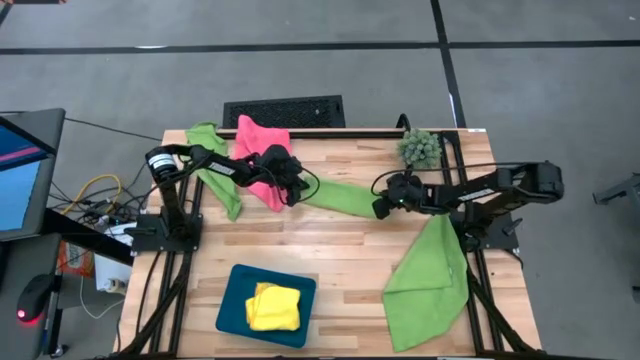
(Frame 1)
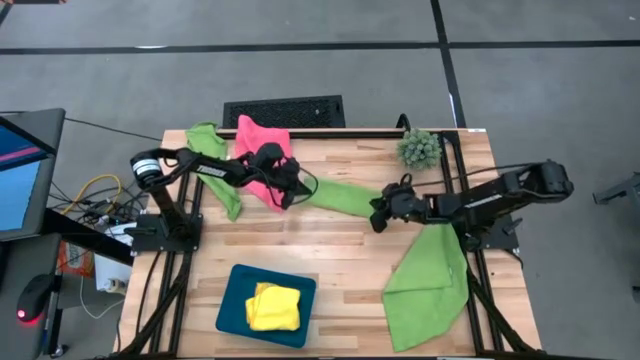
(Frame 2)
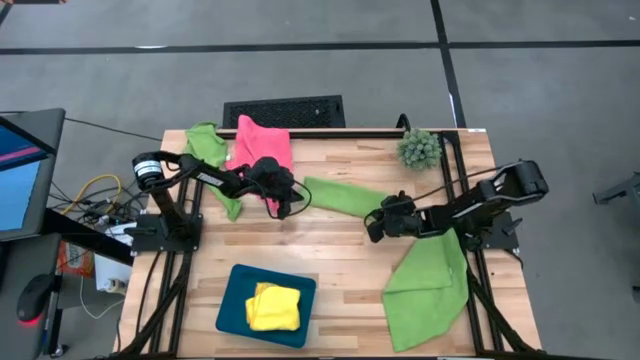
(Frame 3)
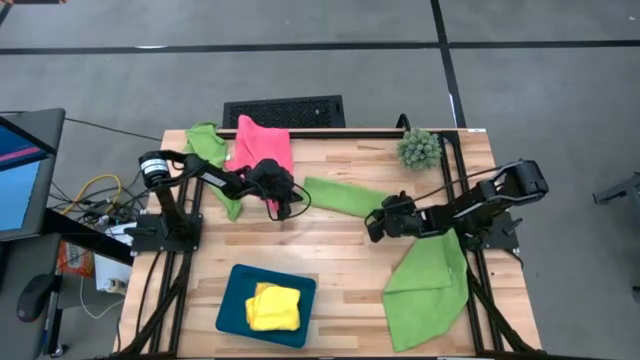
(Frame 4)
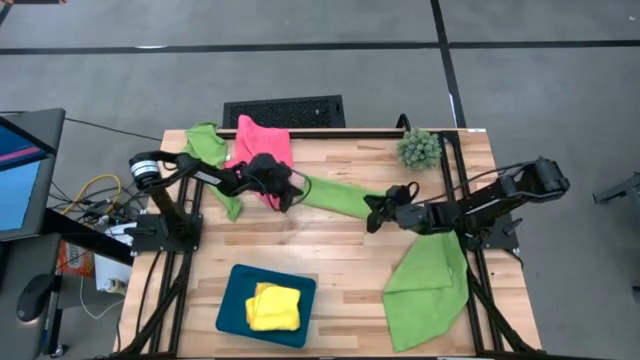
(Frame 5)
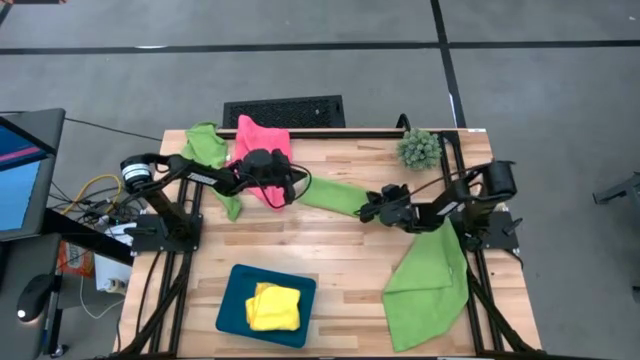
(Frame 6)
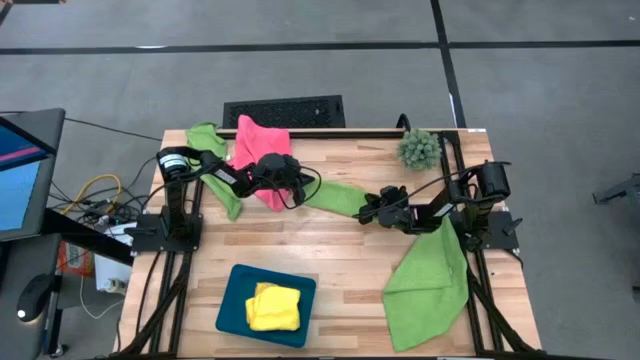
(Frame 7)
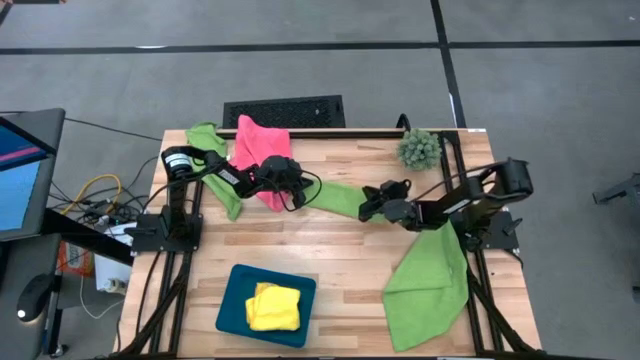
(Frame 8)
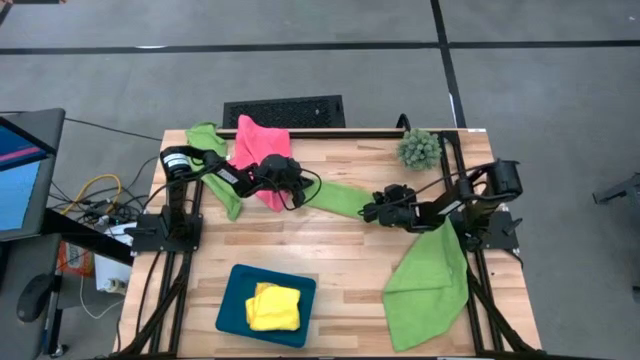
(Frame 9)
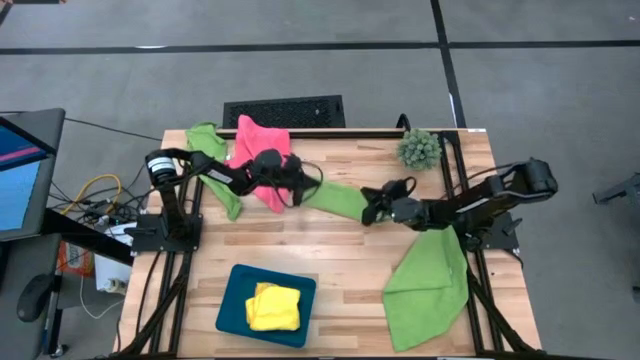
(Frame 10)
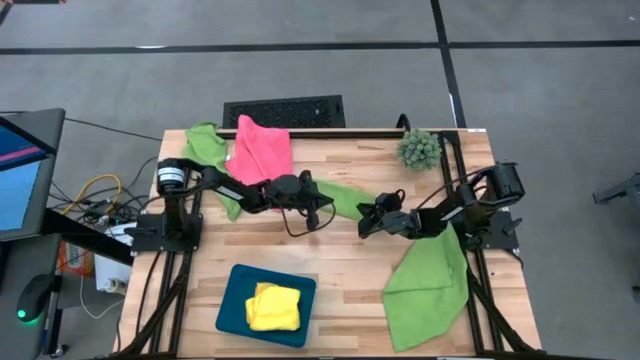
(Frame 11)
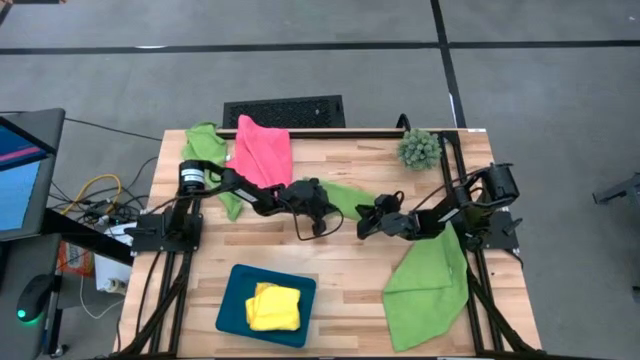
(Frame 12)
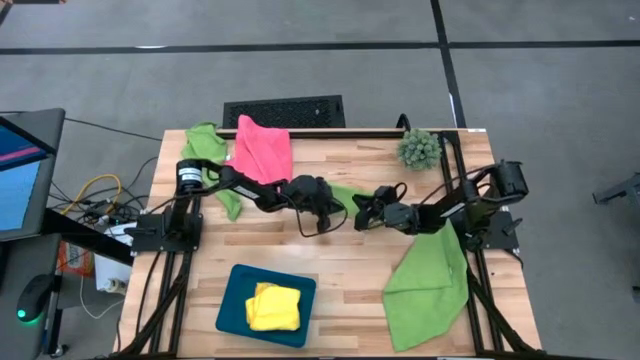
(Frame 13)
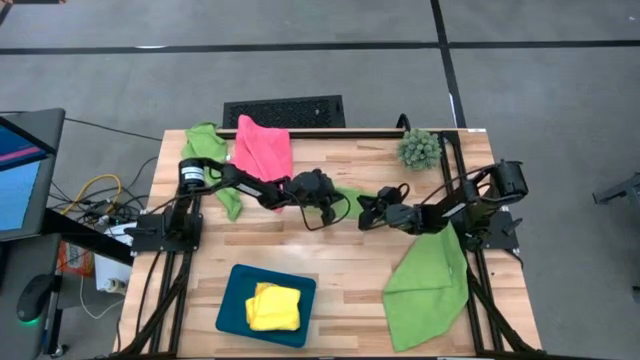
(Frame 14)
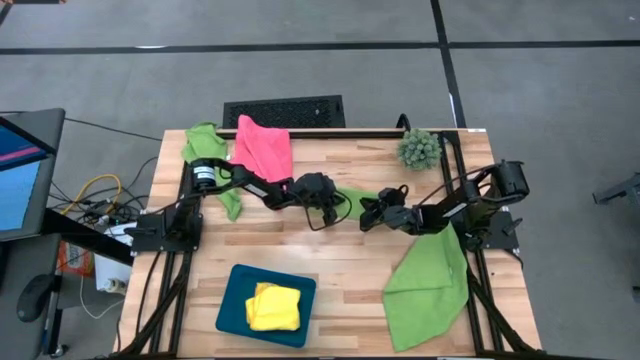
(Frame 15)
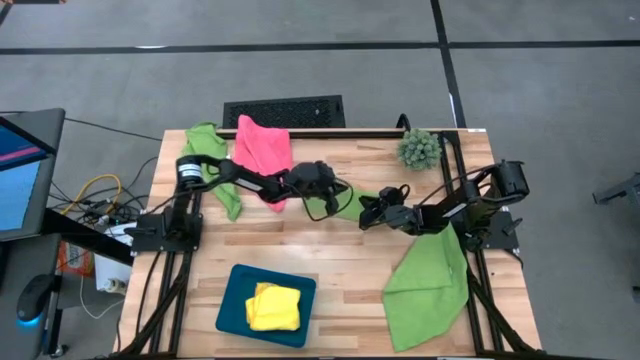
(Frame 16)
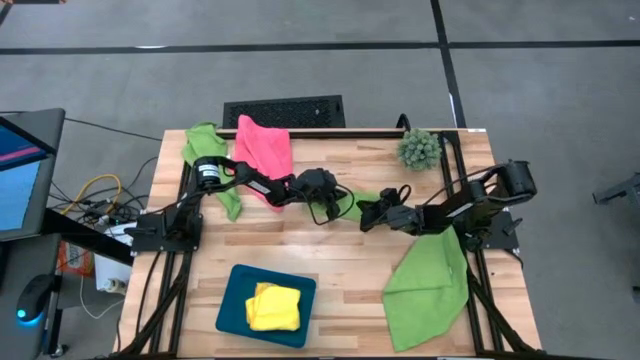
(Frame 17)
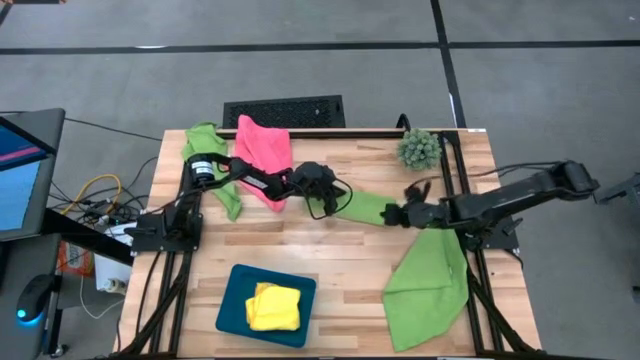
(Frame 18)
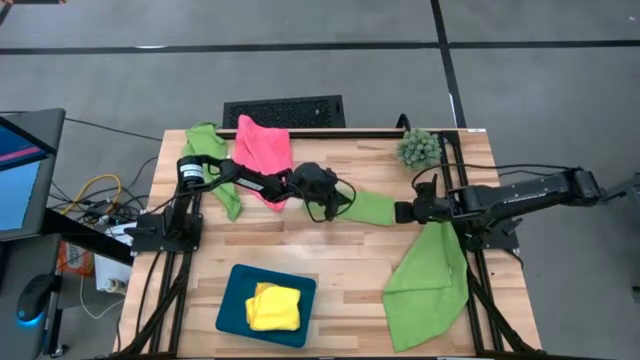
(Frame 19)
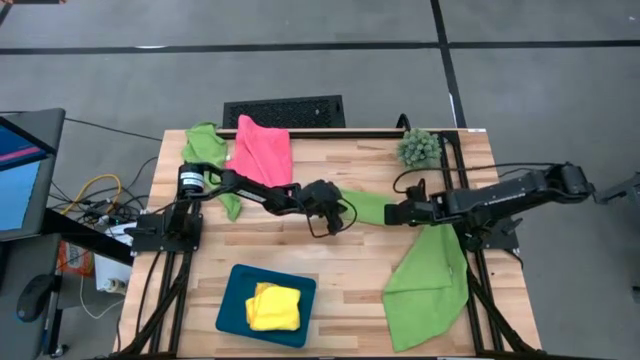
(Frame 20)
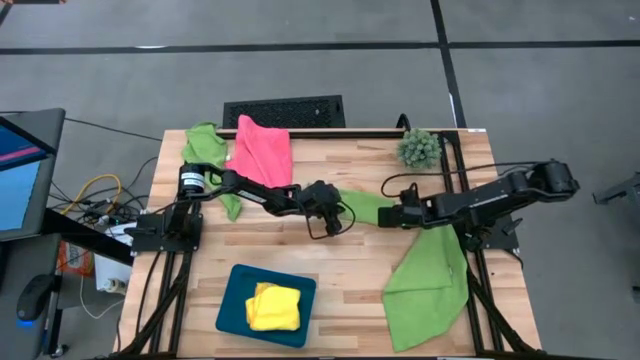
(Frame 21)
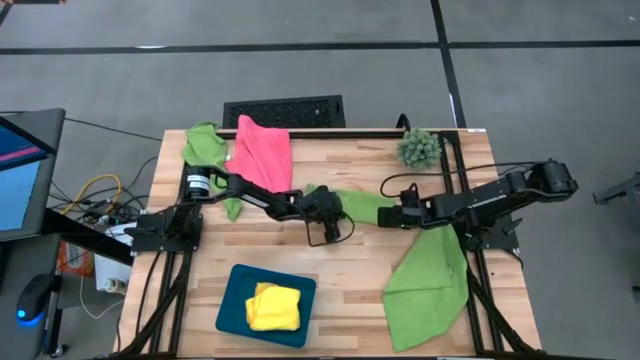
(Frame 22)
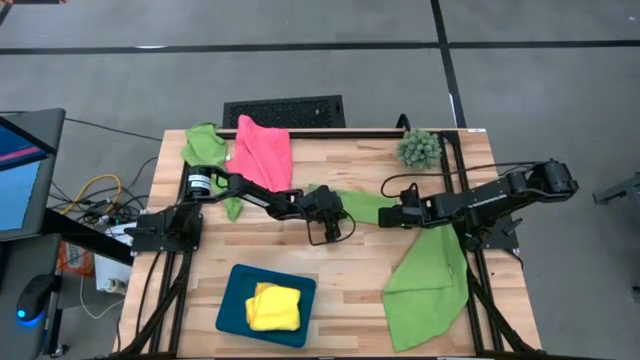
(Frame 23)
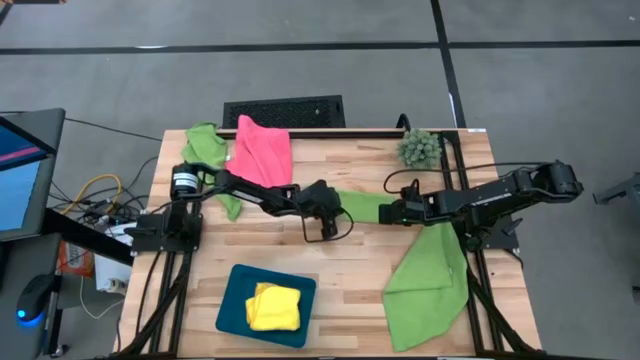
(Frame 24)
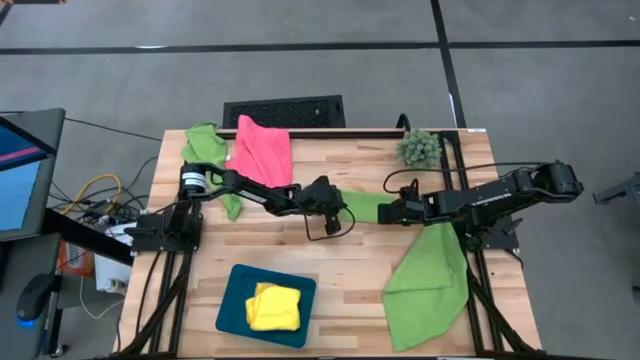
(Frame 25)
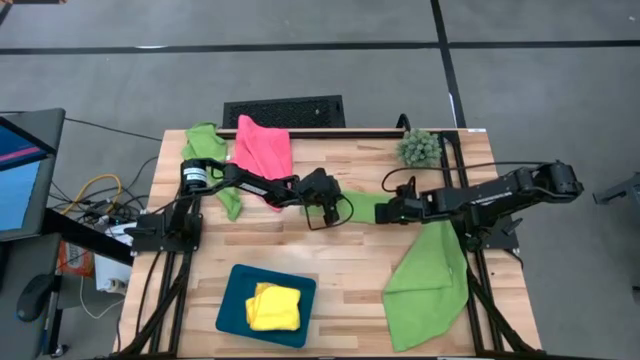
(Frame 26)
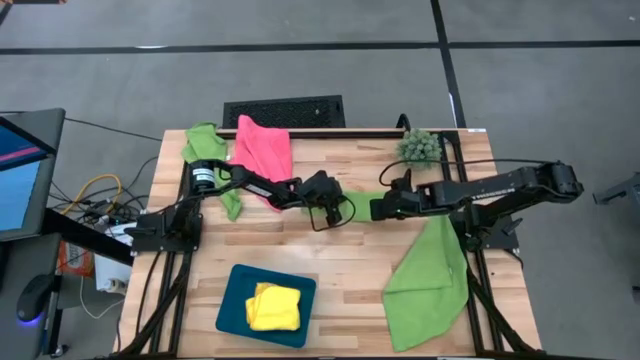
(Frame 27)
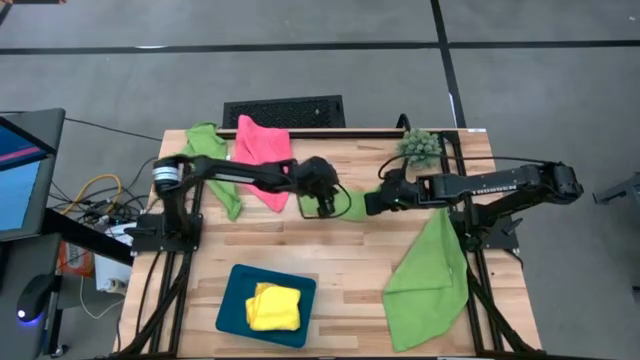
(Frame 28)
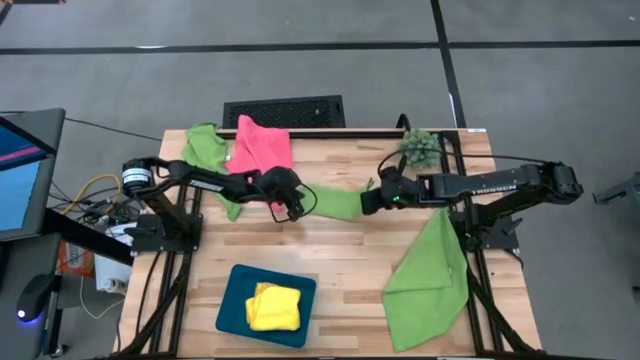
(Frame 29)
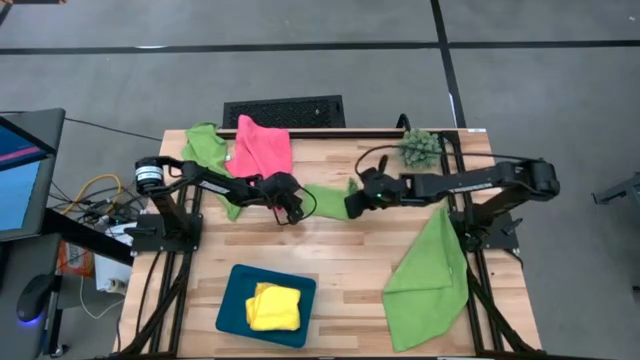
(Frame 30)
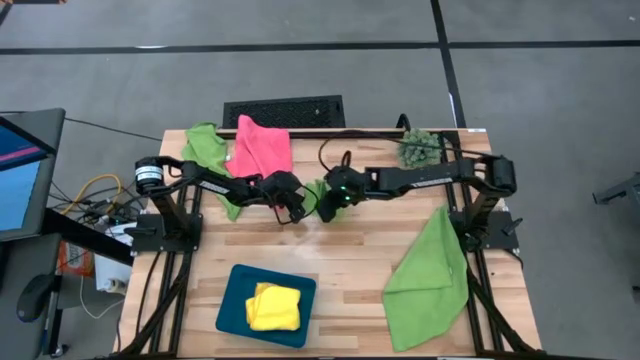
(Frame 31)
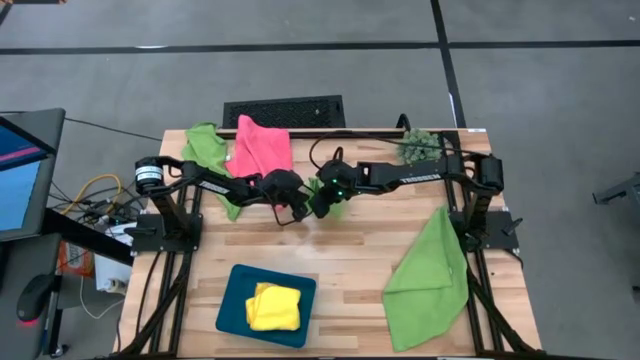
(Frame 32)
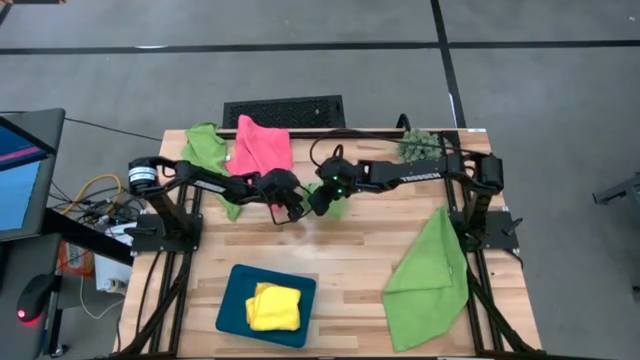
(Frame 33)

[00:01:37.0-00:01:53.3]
Task: Fold microfiber towels
Fold the top right green microfiber towel

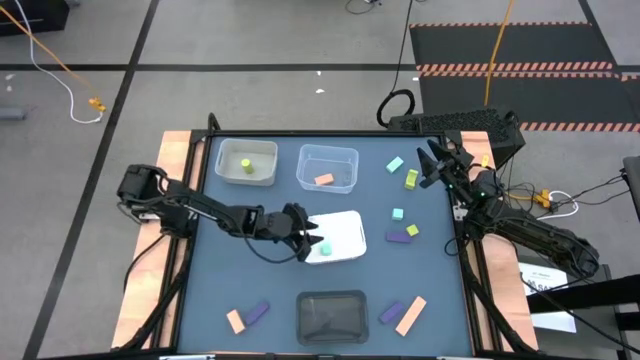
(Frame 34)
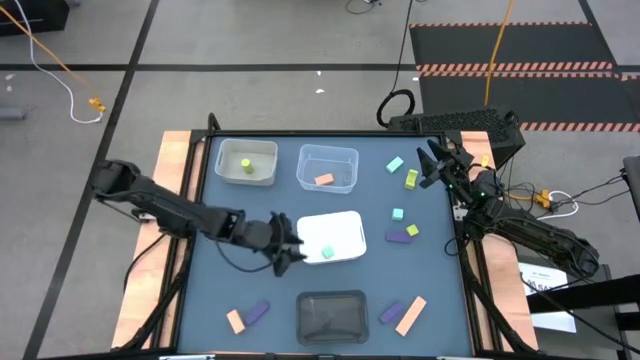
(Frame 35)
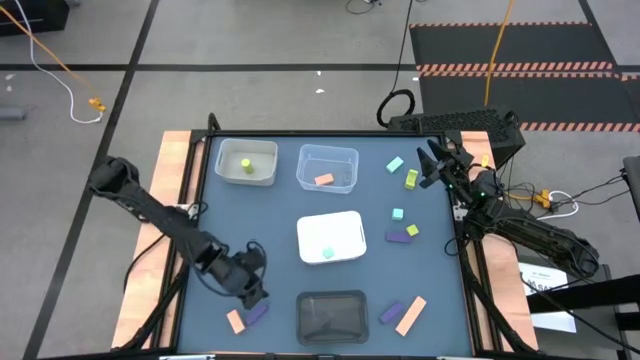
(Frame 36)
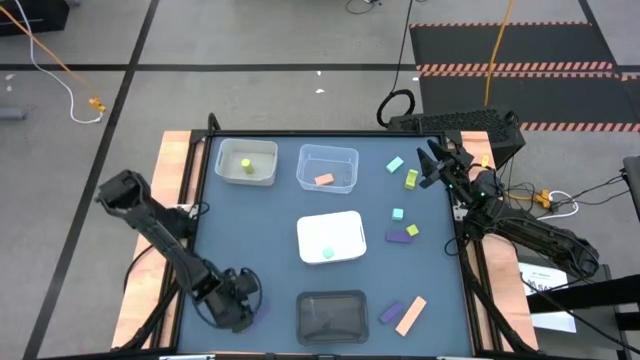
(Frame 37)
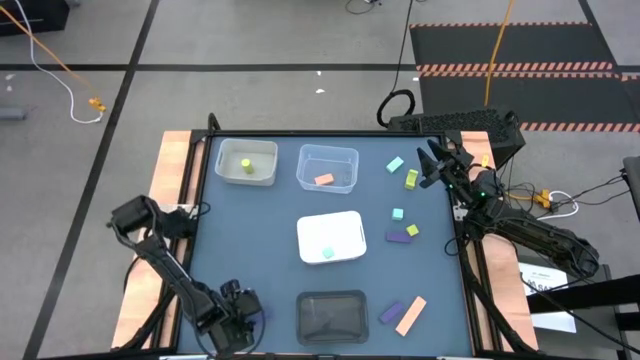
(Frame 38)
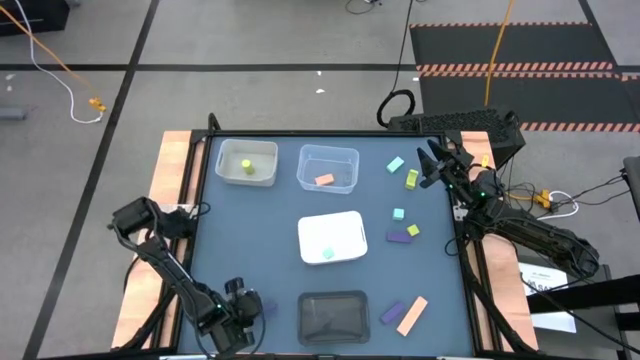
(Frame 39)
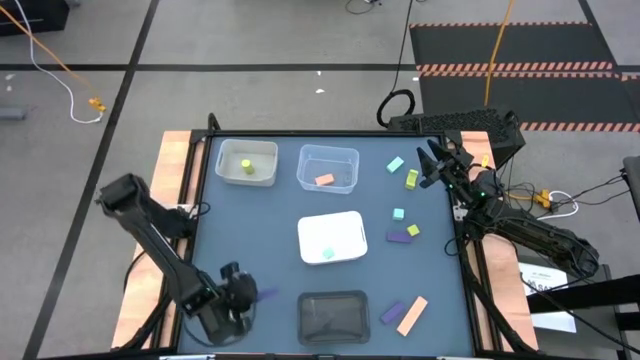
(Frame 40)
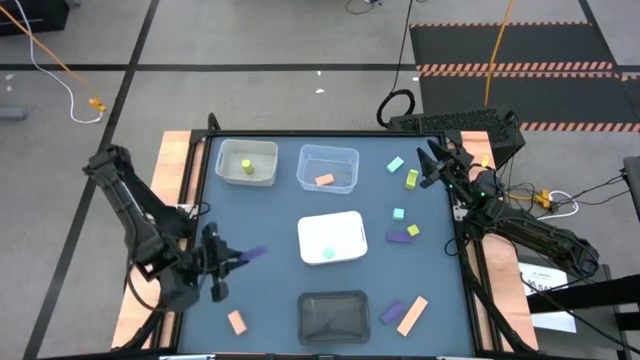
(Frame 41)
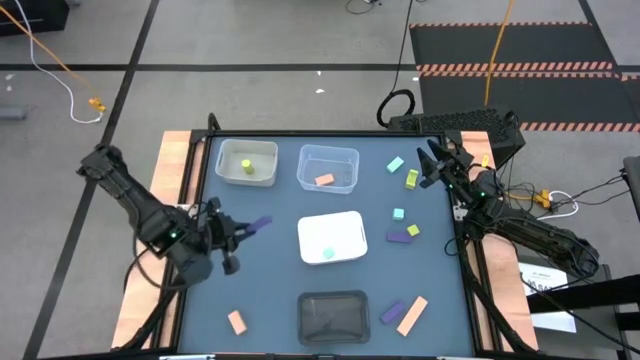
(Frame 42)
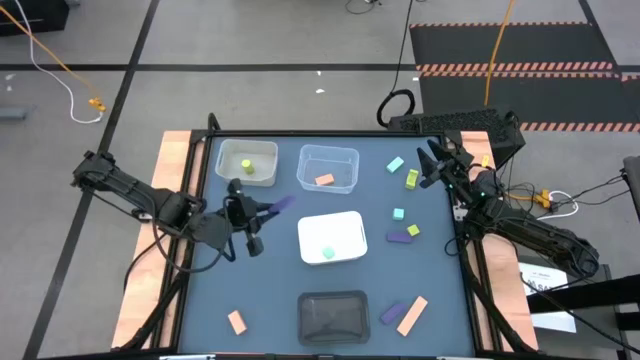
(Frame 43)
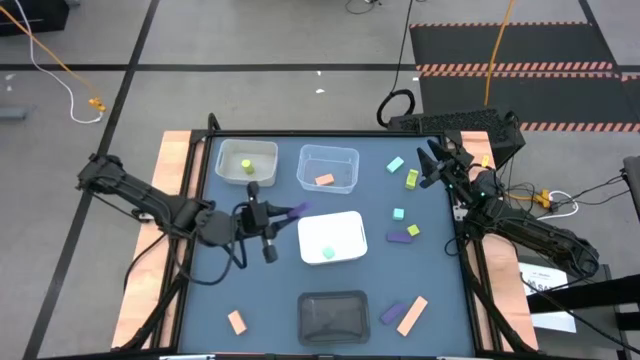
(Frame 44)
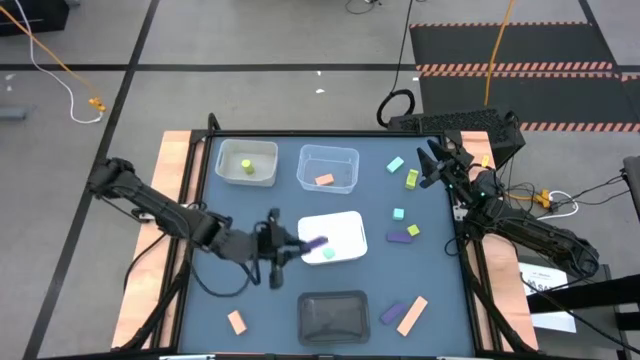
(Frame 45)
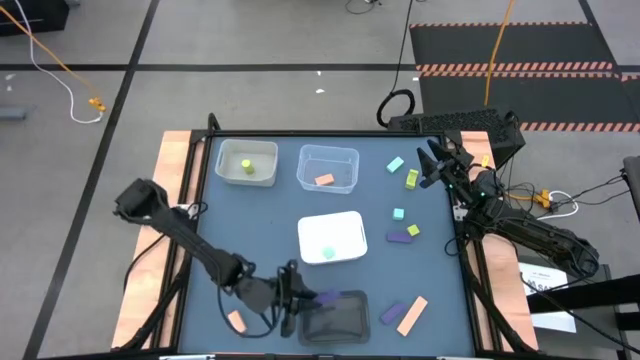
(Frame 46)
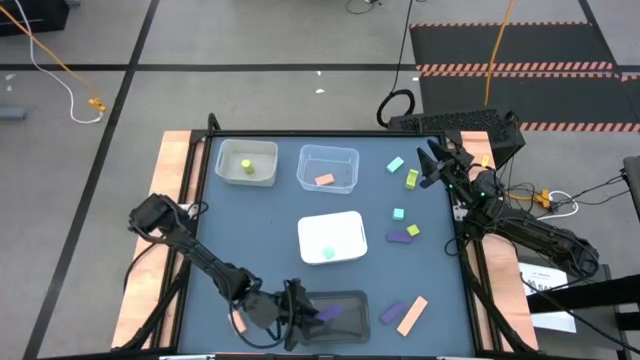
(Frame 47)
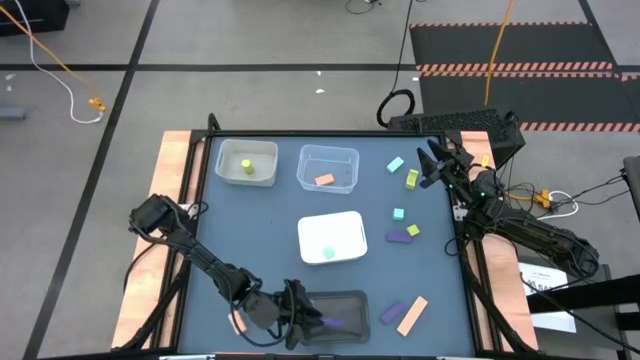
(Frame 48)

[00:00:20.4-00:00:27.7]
Task: Sort & place blocks by color
Put the bottom left violet block into the black bin
